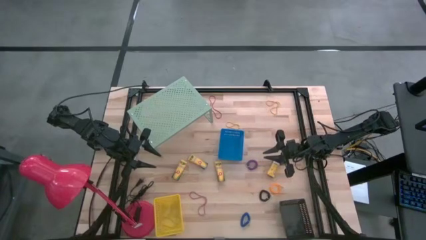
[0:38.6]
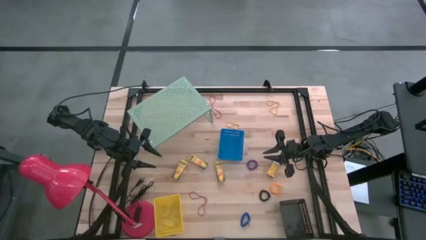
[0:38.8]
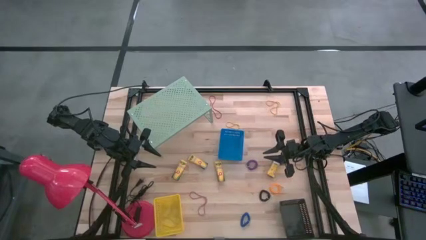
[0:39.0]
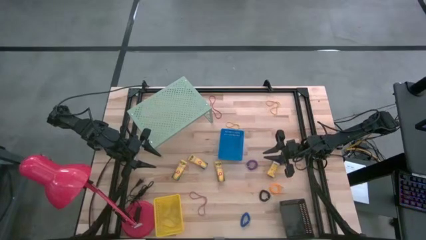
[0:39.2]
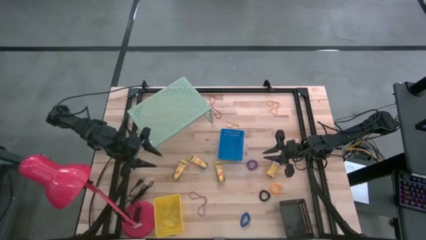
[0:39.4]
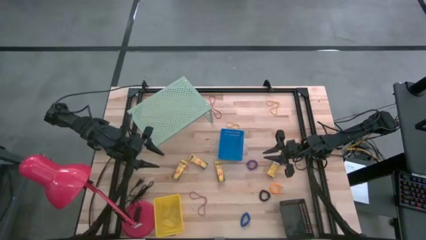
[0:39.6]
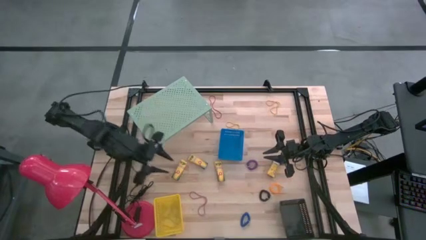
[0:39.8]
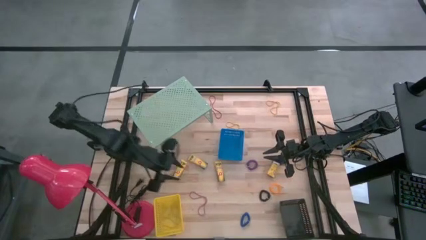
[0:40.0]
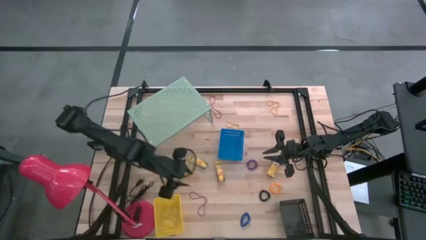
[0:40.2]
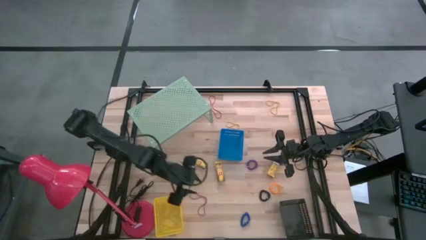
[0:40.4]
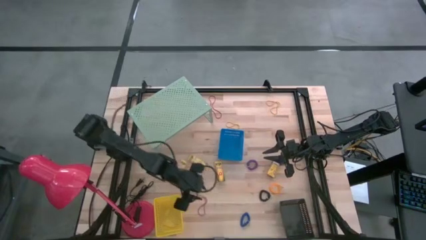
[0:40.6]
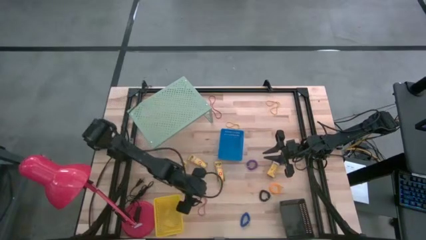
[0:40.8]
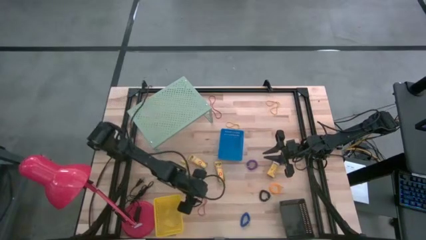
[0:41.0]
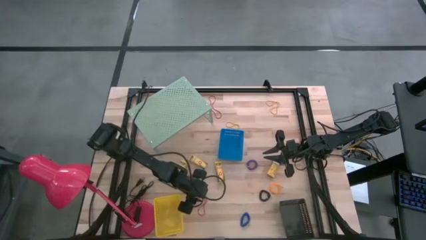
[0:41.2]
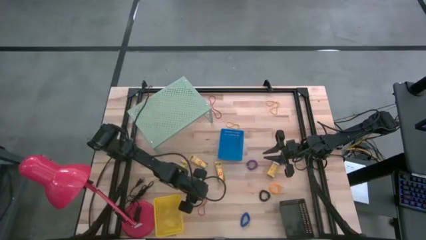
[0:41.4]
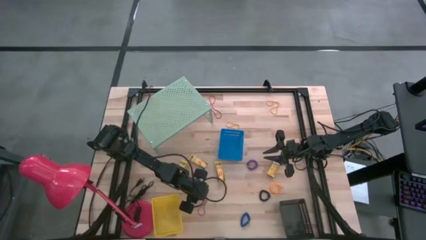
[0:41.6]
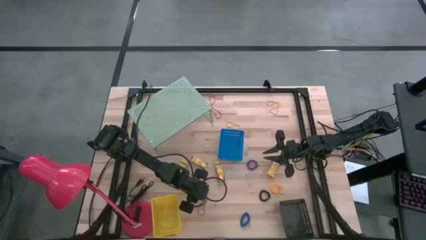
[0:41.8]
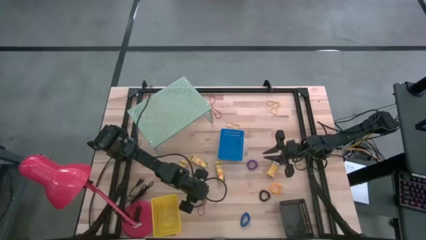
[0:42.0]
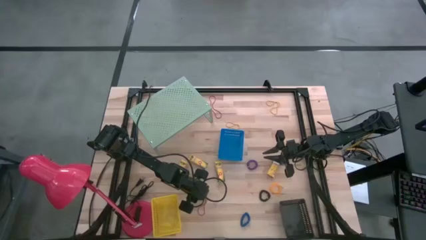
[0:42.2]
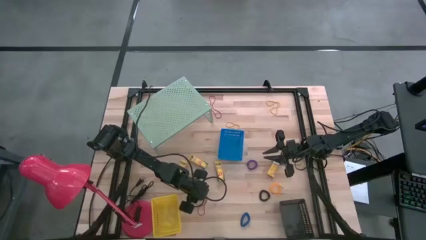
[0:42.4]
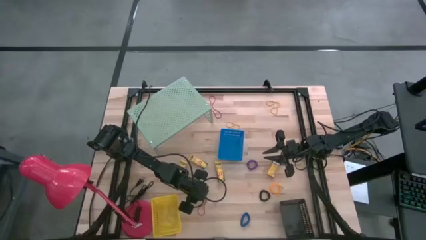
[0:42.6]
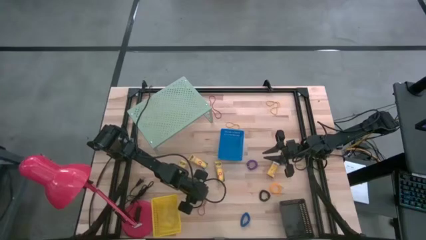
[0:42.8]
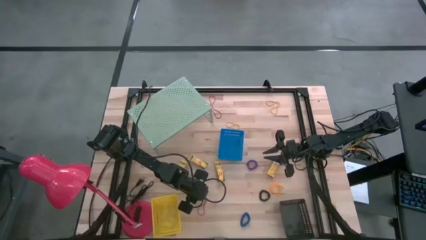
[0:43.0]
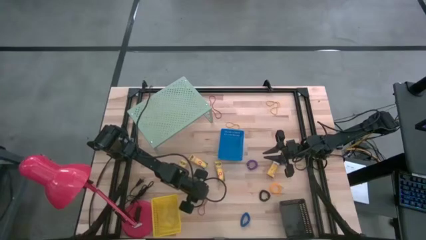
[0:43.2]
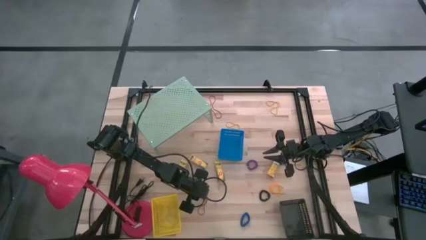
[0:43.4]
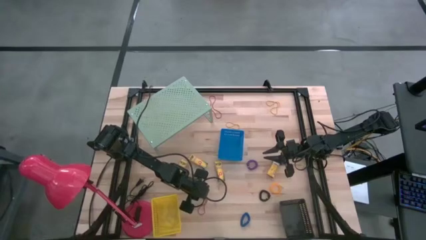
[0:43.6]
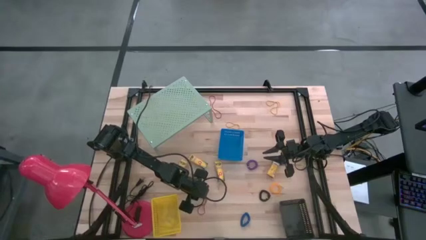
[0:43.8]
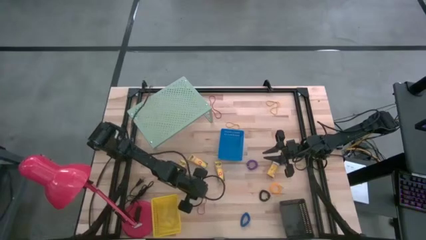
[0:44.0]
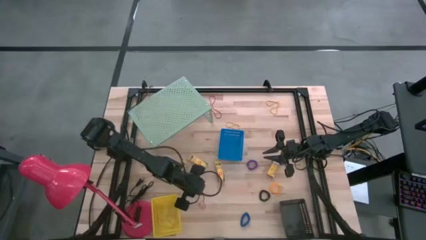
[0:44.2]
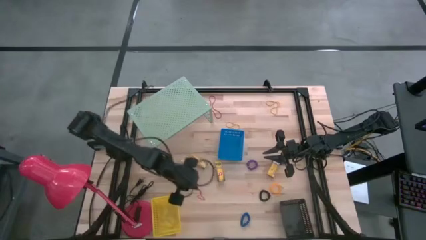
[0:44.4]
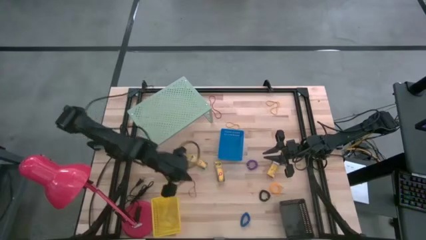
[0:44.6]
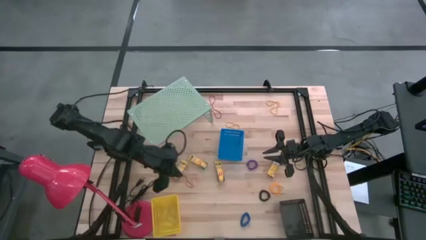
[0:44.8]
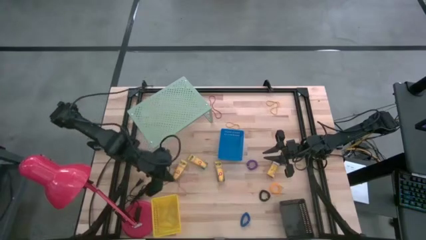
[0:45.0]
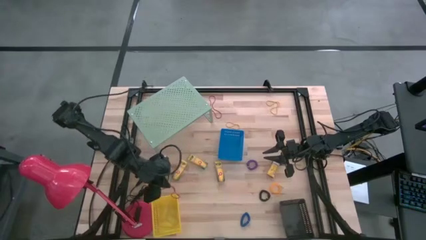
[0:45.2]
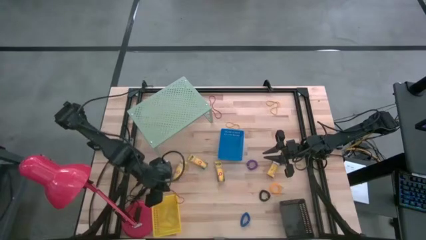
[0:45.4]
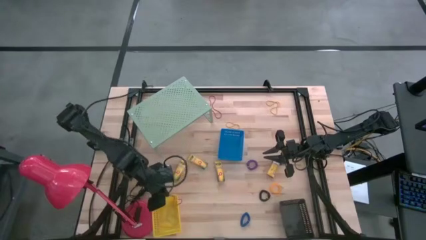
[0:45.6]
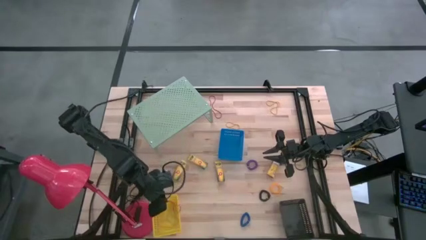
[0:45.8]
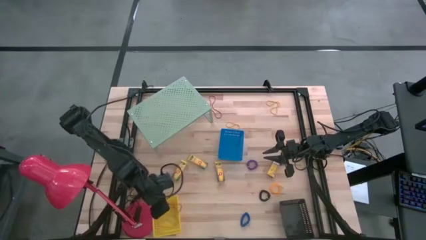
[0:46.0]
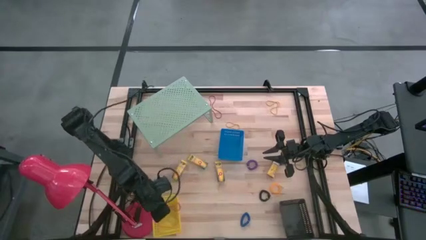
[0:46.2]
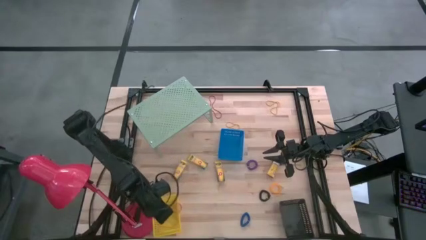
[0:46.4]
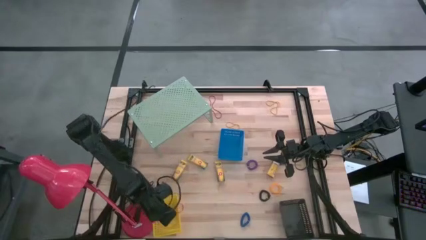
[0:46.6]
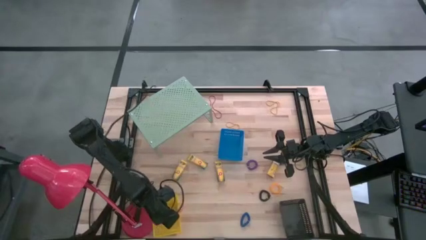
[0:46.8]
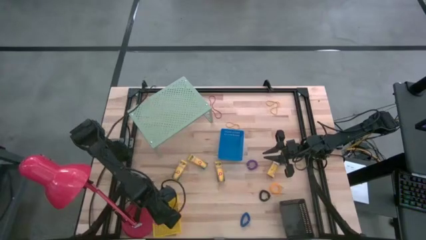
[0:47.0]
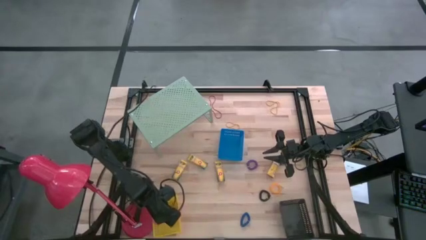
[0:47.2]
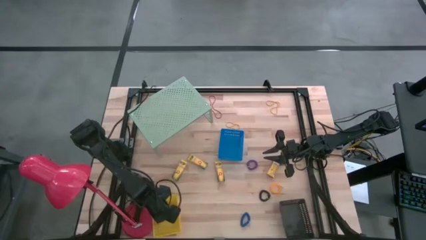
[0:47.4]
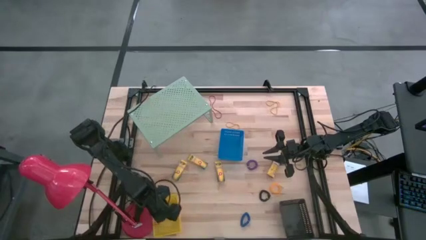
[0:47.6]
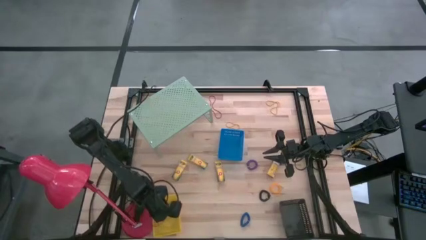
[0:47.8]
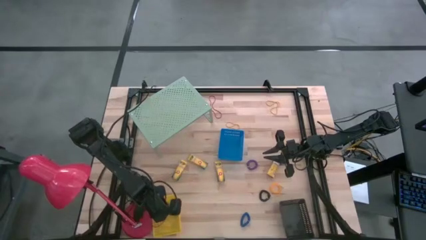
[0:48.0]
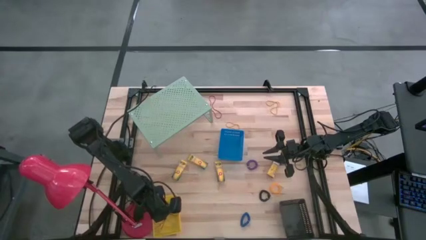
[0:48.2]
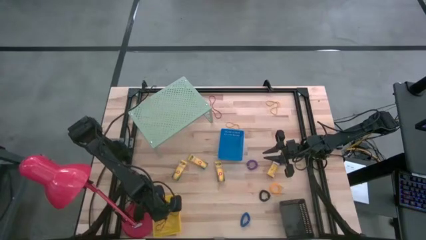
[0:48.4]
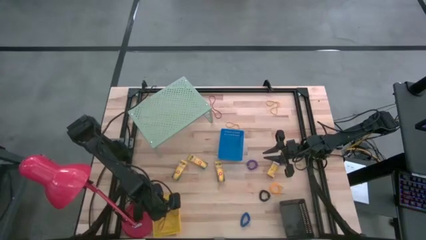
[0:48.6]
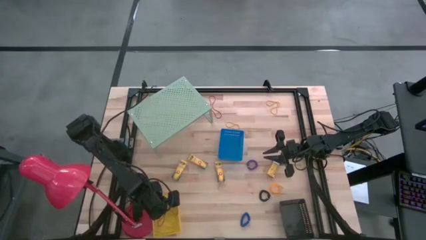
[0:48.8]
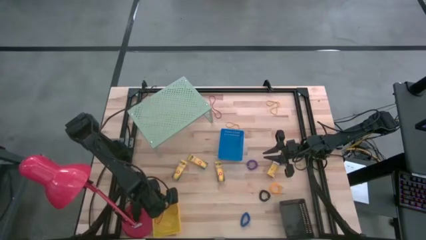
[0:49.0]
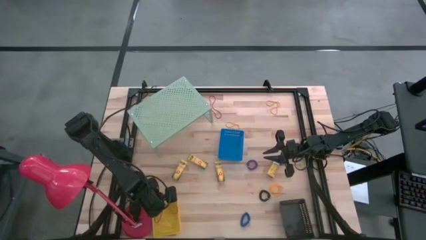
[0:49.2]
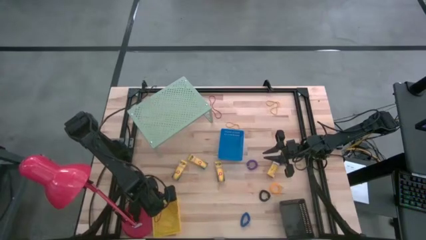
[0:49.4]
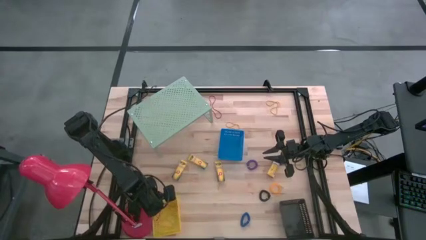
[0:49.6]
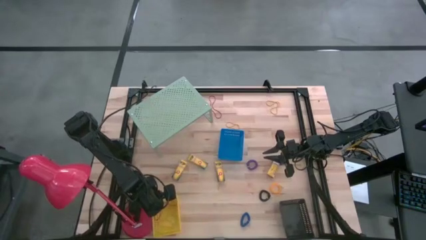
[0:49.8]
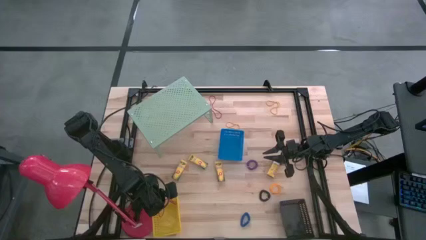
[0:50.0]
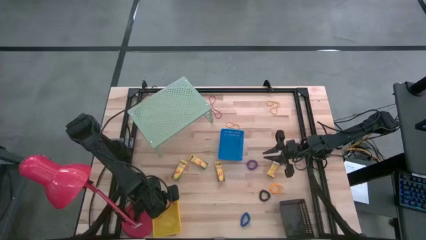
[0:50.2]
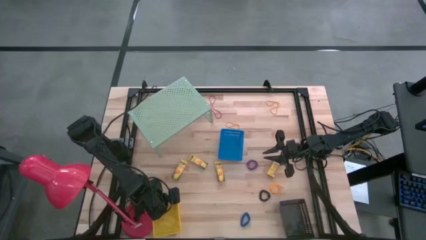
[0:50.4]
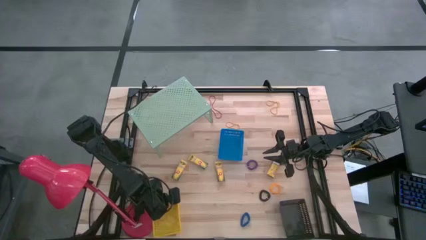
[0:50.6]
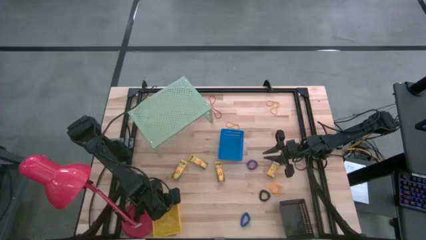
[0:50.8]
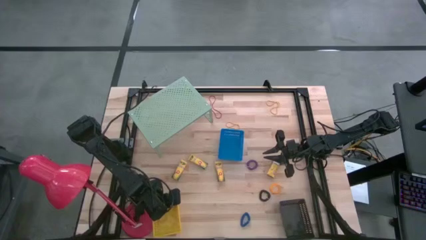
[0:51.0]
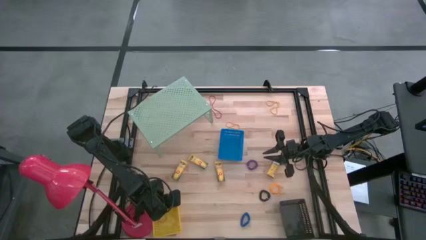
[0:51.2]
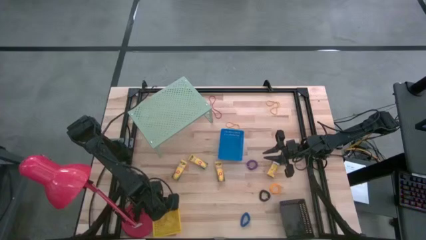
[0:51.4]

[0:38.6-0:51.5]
Task: Pick & Place Office Desk Supplies
Put the red rubber band into the yellow basket

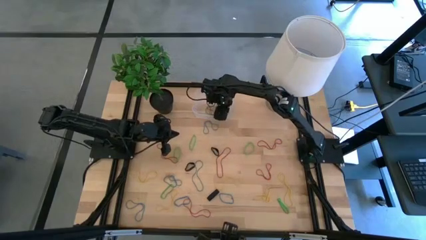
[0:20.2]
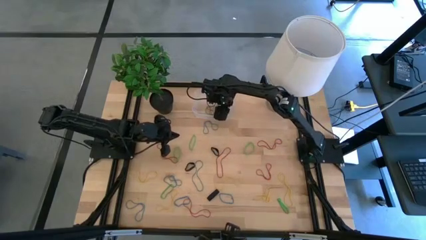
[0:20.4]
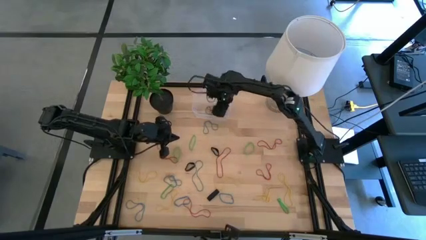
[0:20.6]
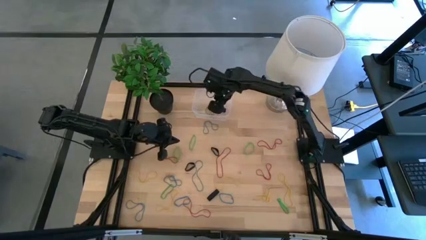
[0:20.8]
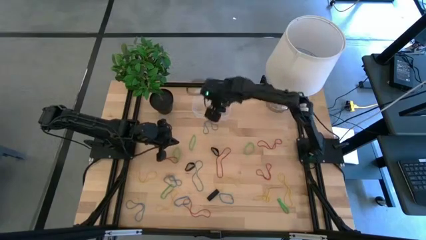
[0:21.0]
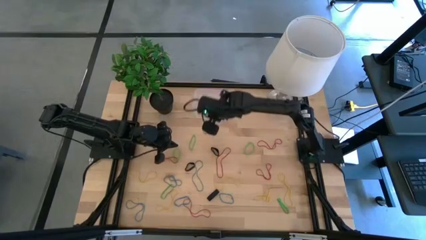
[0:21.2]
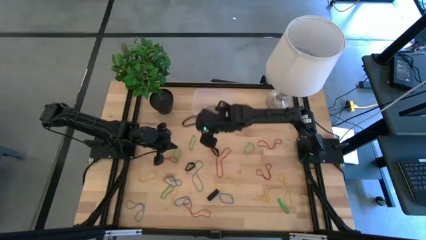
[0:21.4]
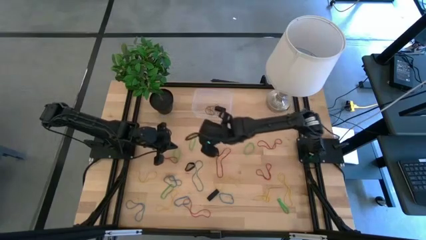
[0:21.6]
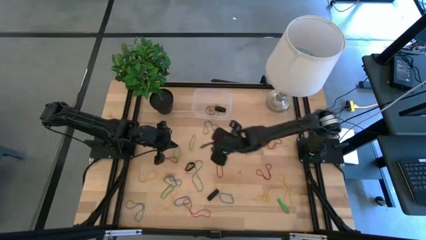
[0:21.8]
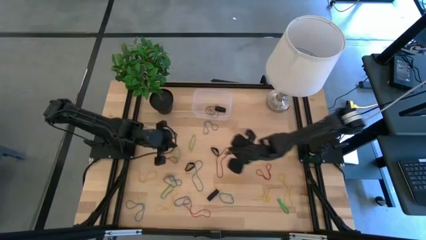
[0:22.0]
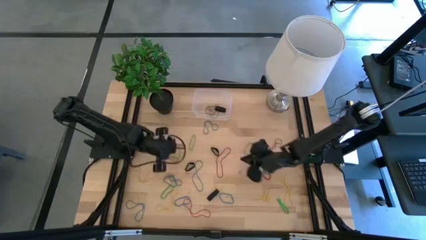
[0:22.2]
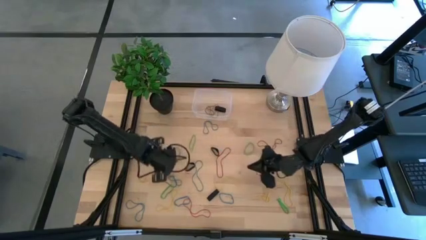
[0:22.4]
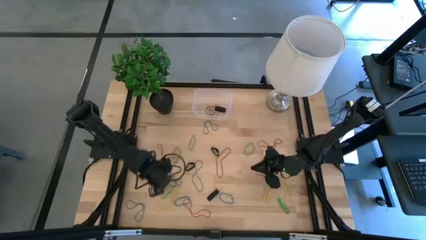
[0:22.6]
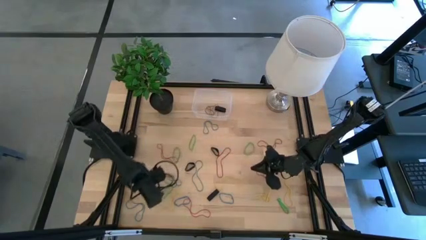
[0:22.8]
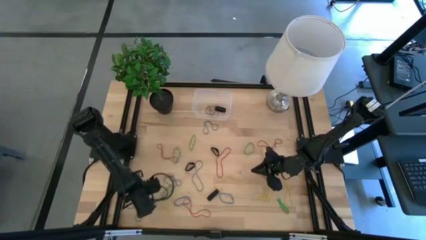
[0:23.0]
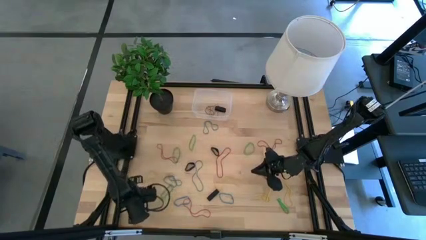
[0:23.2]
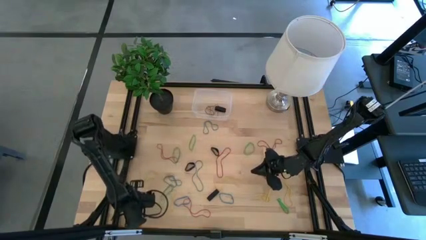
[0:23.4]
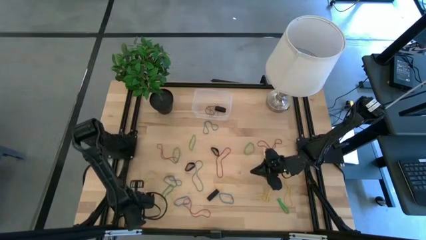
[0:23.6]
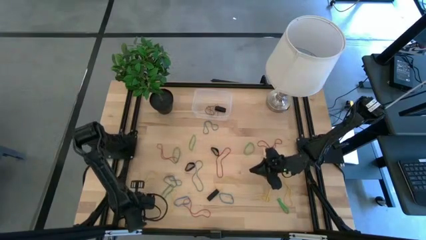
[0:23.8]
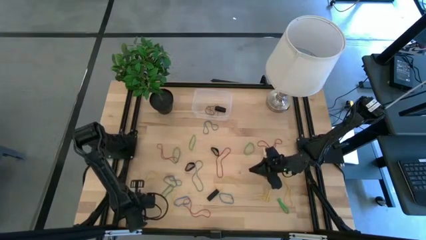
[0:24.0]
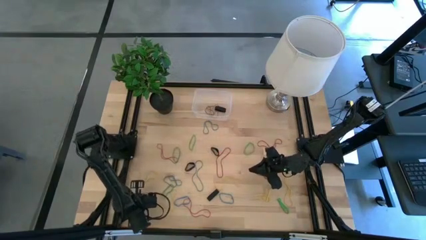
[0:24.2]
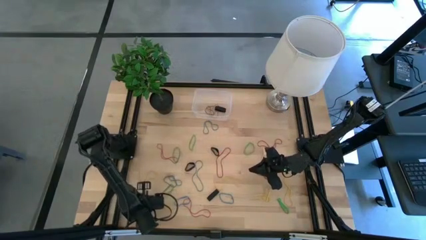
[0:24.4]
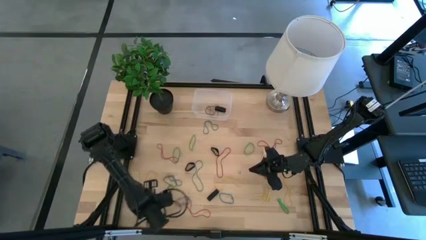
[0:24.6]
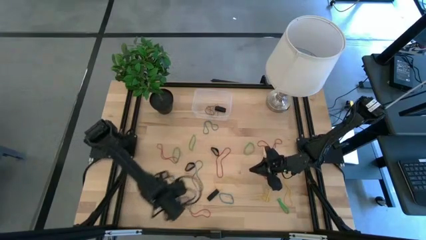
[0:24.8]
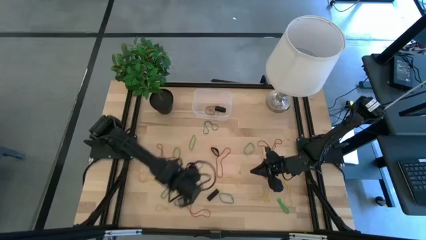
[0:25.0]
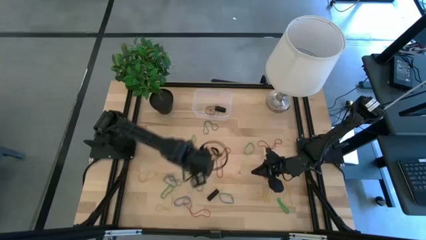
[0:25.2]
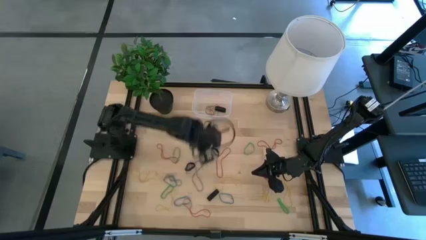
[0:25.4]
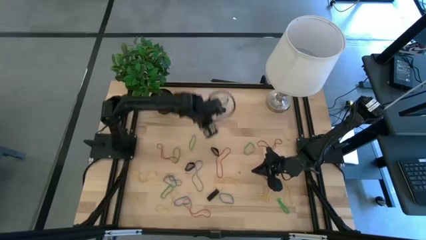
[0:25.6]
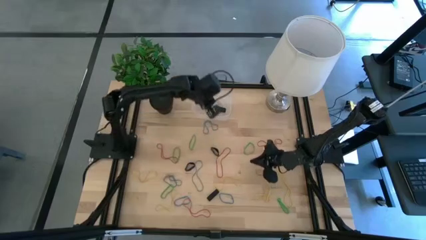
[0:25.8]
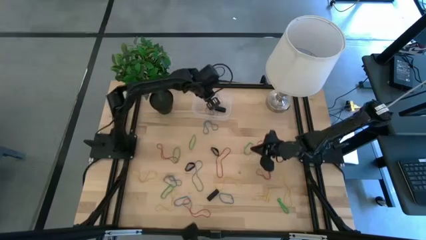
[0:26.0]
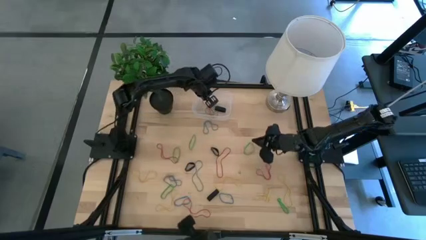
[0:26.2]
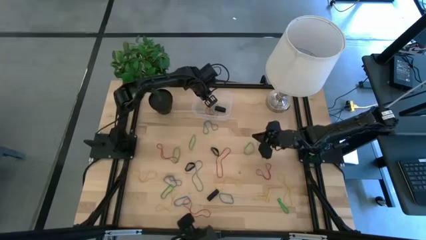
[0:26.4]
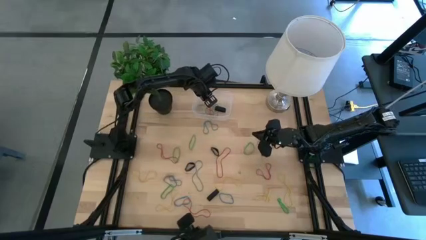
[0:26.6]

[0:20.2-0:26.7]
Task: Pick and place rubber bands into bin
Put the blue rubber band into the transparent bin
